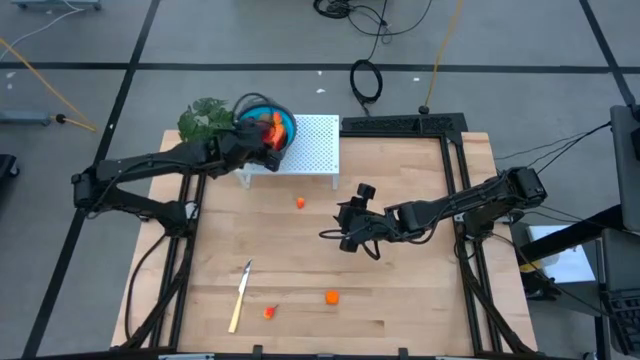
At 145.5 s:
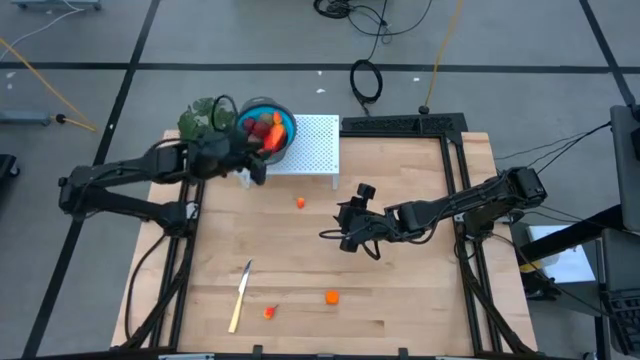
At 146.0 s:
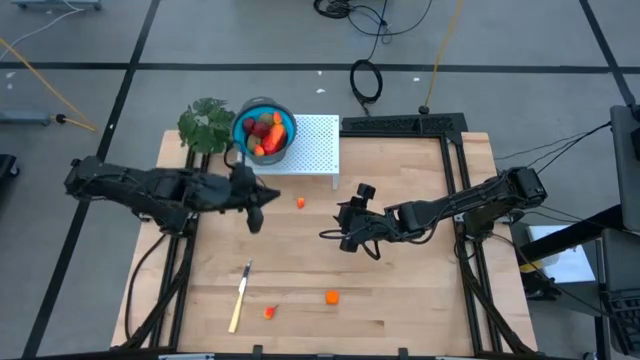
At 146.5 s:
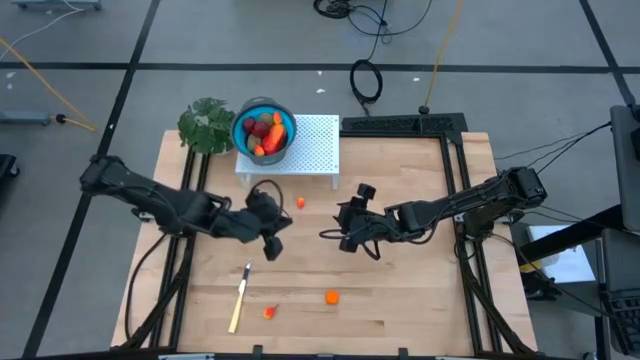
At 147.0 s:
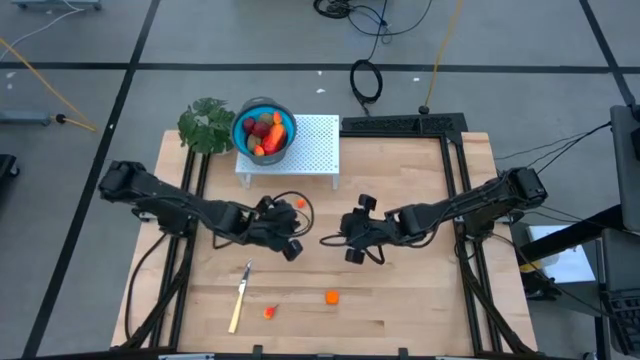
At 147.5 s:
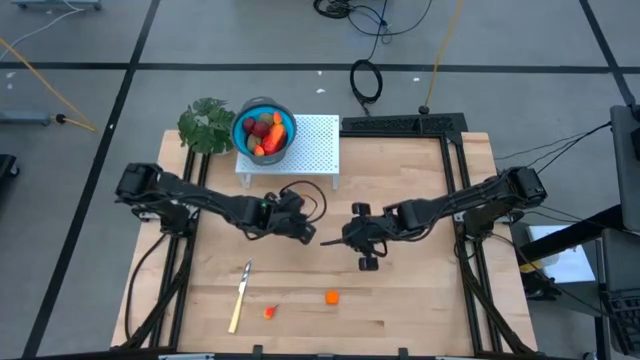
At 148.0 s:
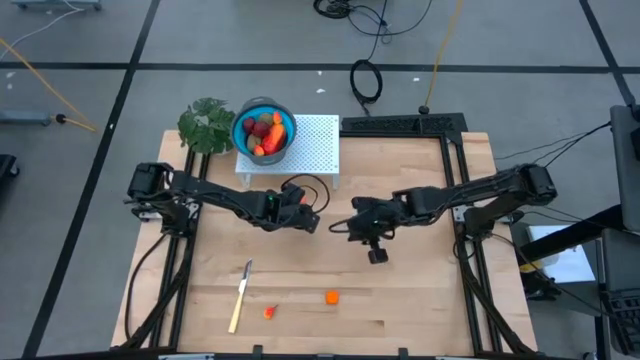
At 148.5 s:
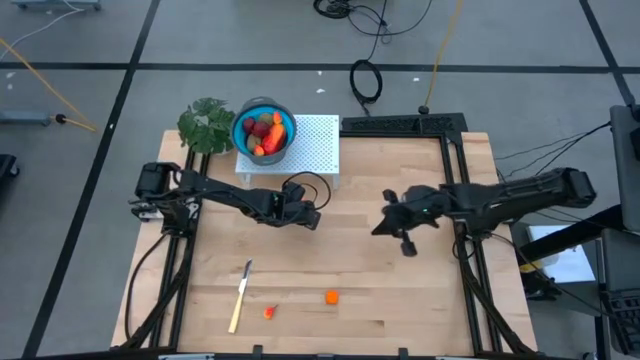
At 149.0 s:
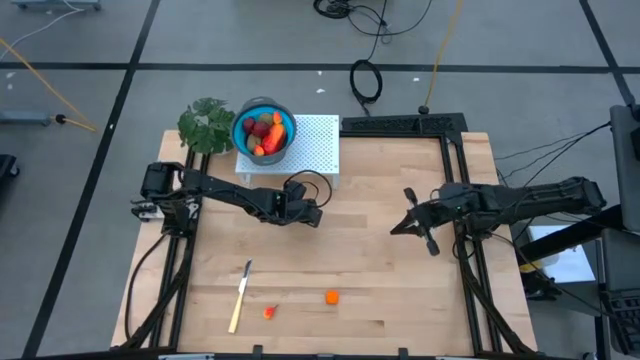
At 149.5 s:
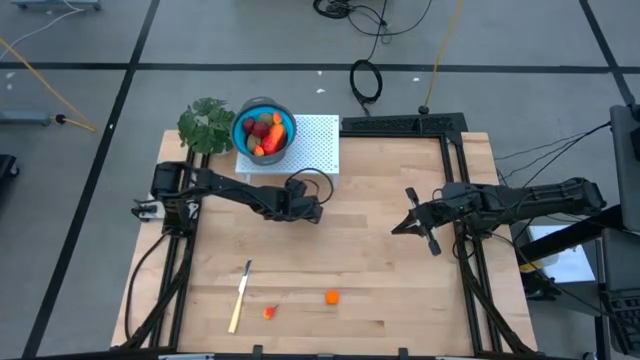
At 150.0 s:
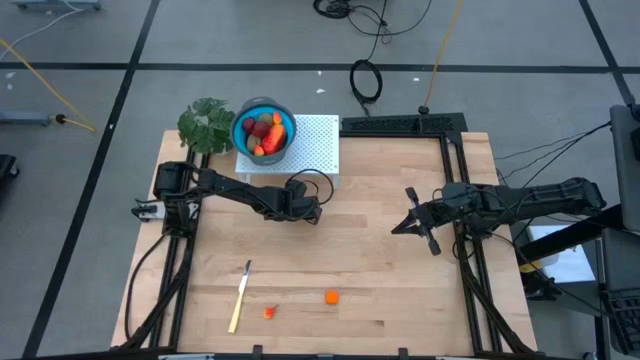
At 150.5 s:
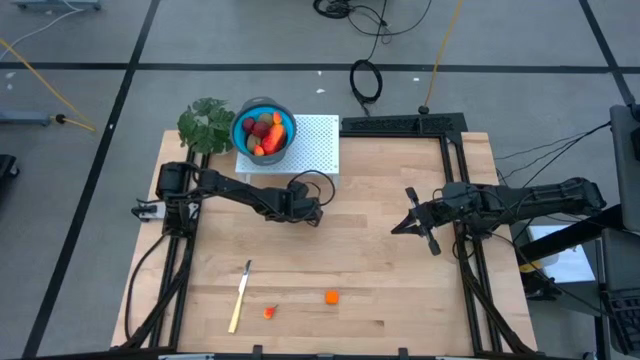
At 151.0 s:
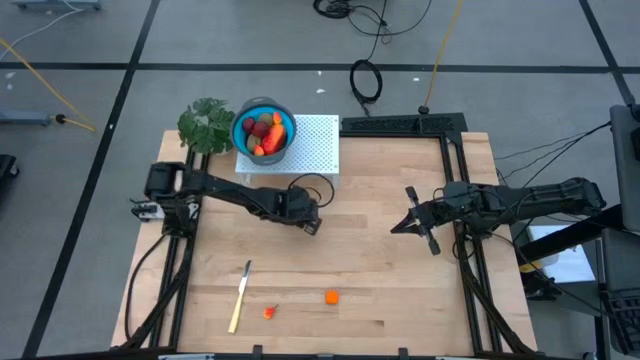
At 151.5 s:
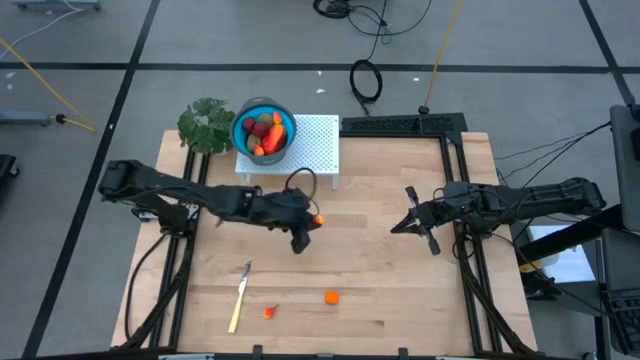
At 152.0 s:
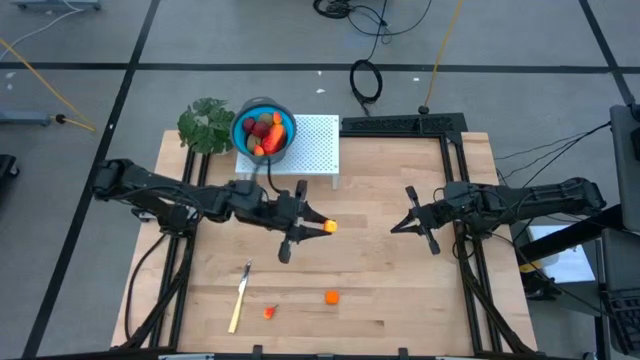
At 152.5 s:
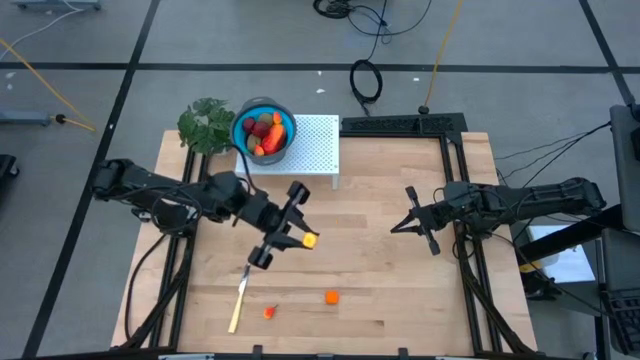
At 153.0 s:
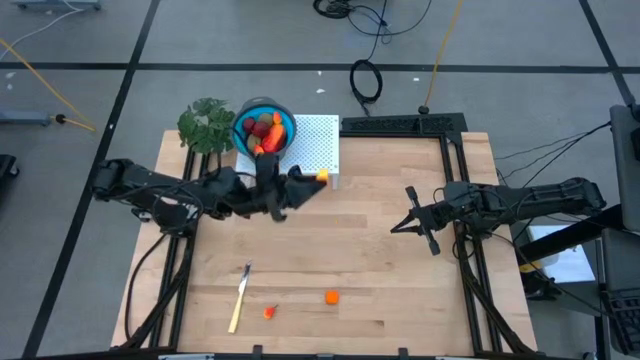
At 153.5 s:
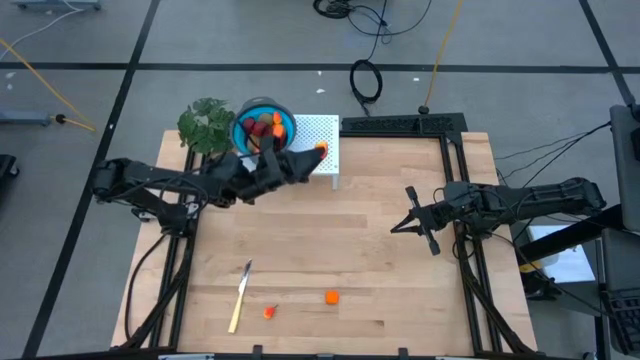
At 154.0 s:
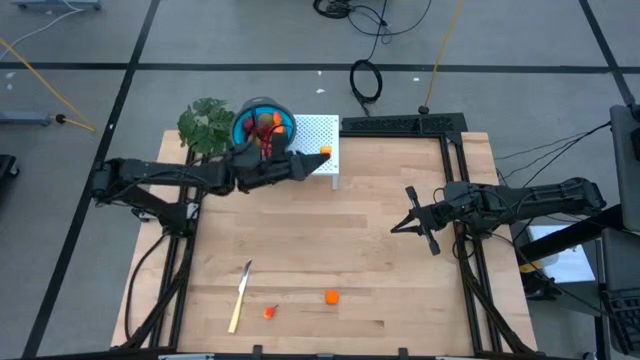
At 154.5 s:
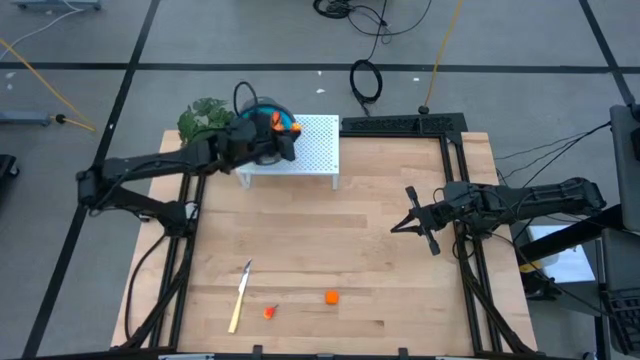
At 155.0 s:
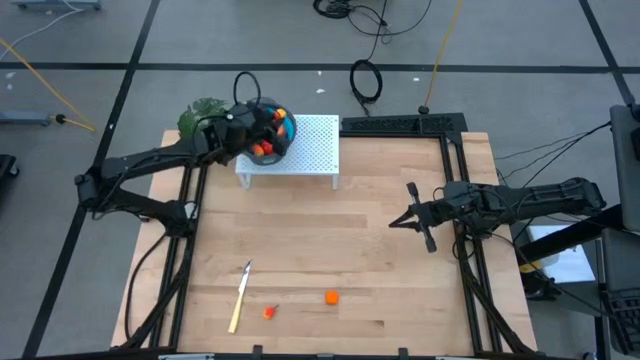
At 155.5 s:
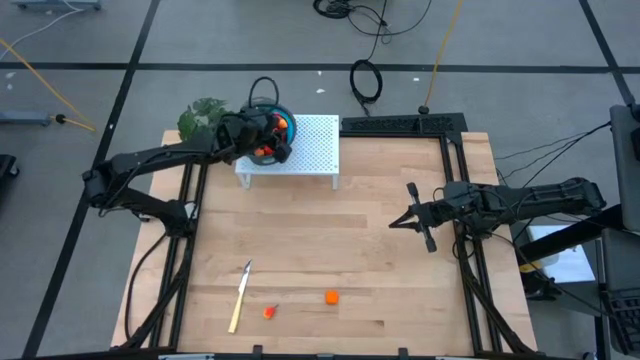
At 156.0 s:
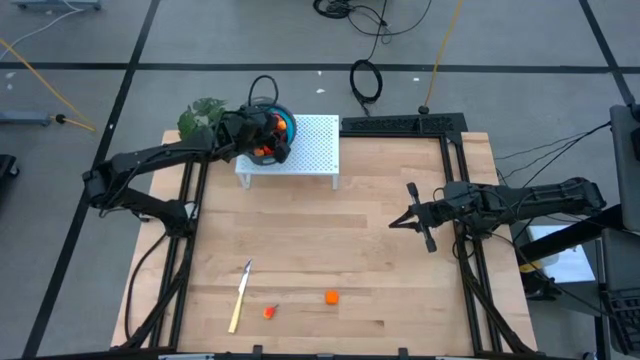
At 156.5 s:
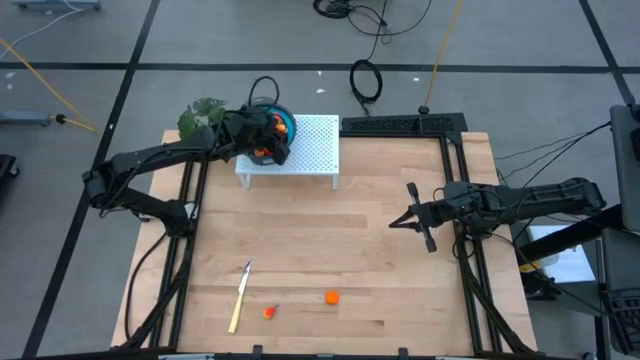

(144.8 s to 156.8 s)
Task: Pick & Place Fruit
Put the top peach into the blue strainer bowl on the shelf

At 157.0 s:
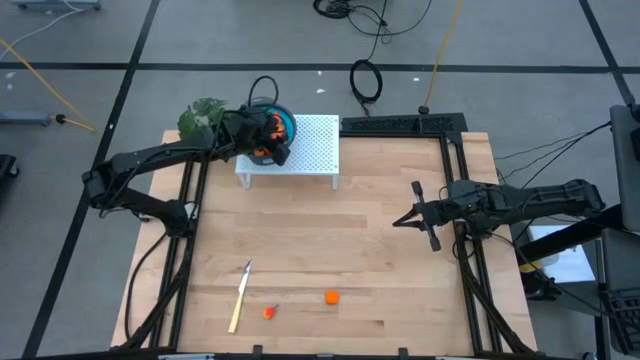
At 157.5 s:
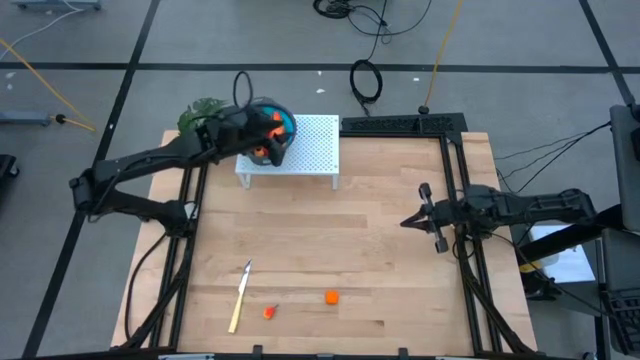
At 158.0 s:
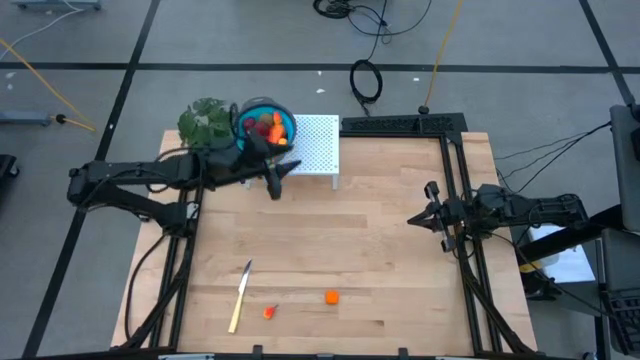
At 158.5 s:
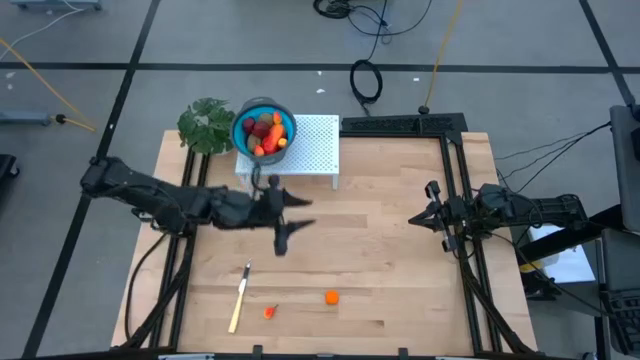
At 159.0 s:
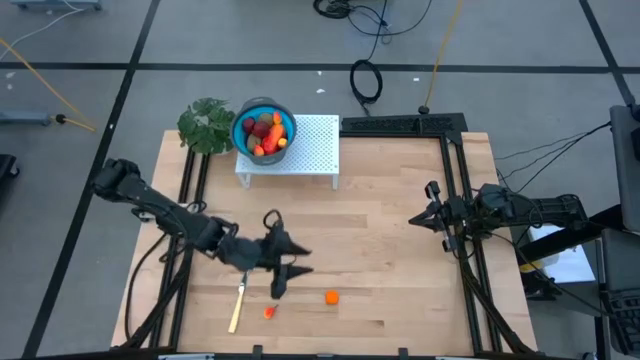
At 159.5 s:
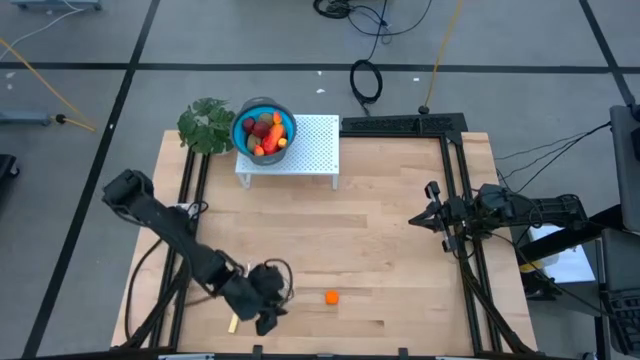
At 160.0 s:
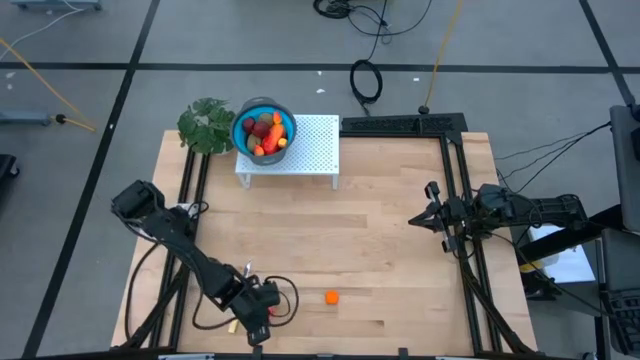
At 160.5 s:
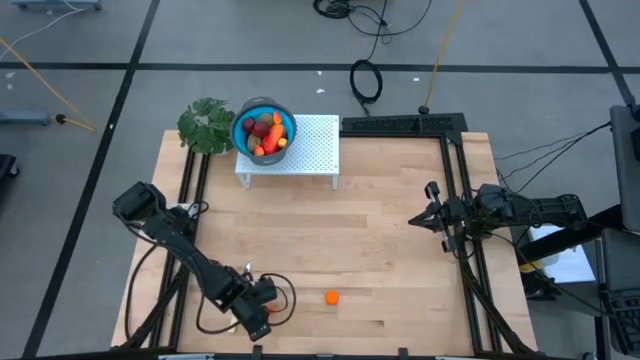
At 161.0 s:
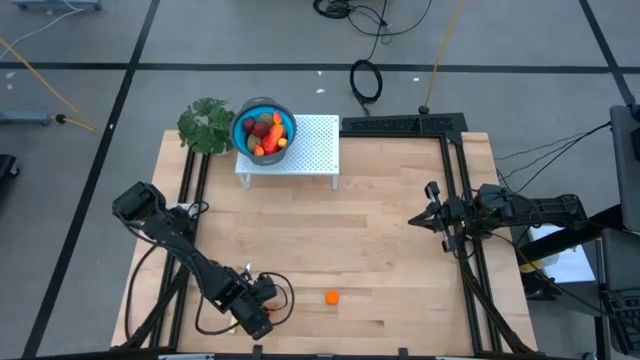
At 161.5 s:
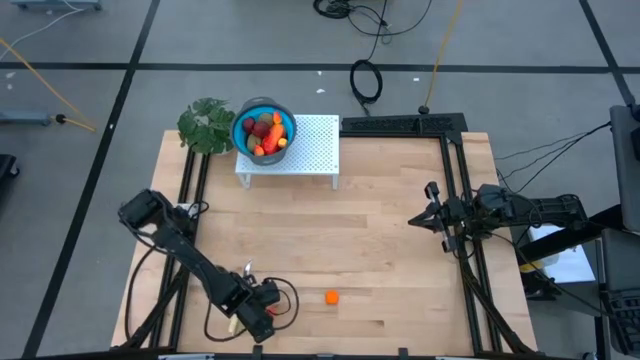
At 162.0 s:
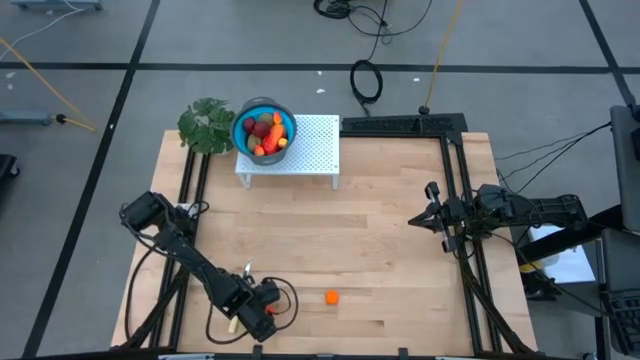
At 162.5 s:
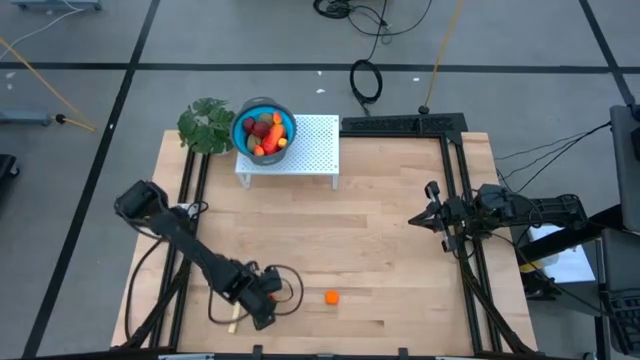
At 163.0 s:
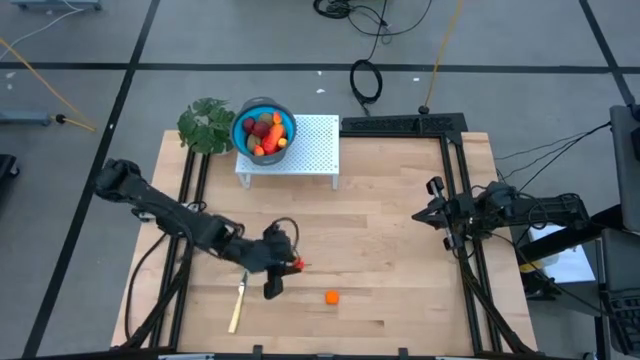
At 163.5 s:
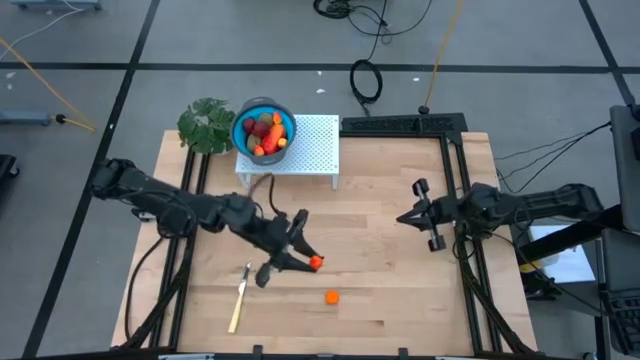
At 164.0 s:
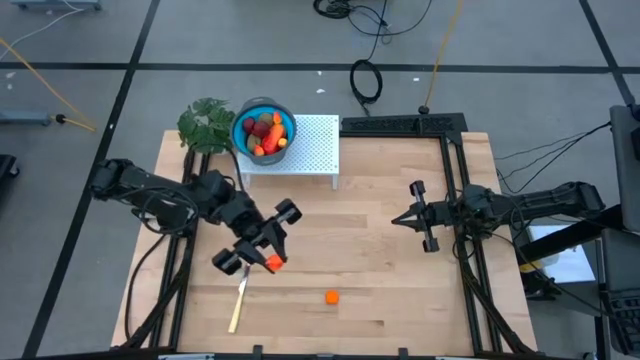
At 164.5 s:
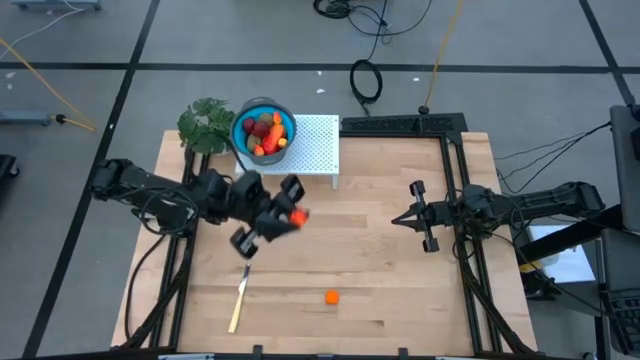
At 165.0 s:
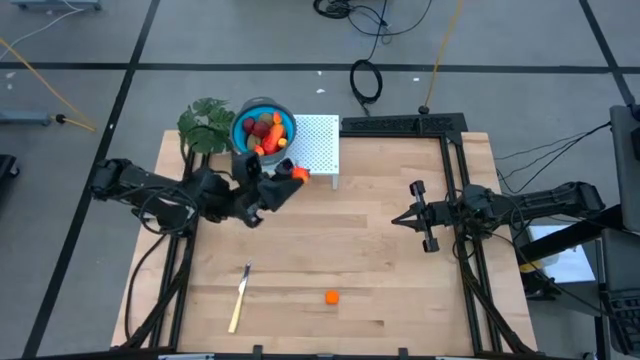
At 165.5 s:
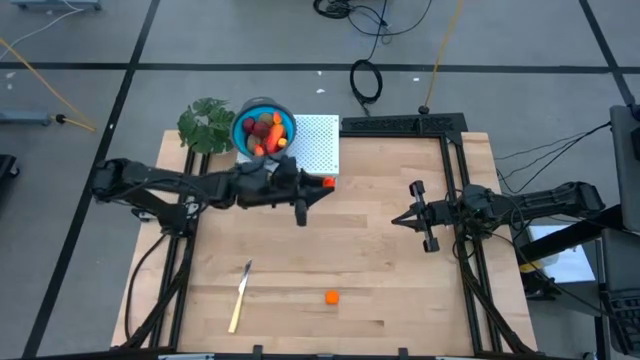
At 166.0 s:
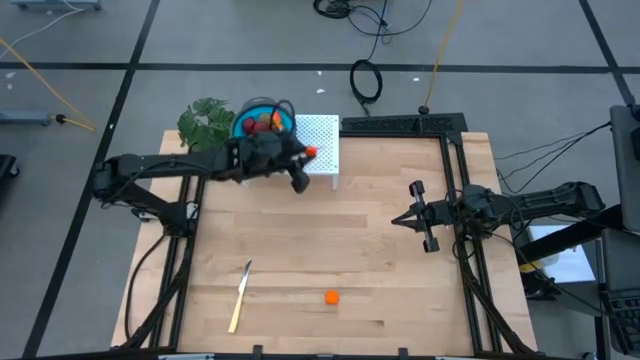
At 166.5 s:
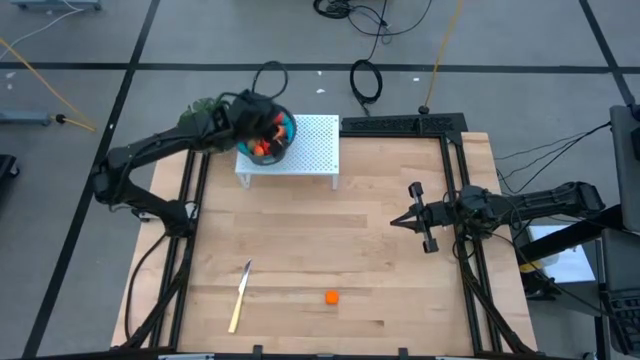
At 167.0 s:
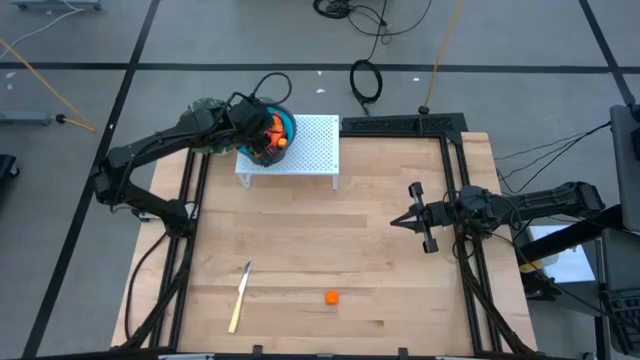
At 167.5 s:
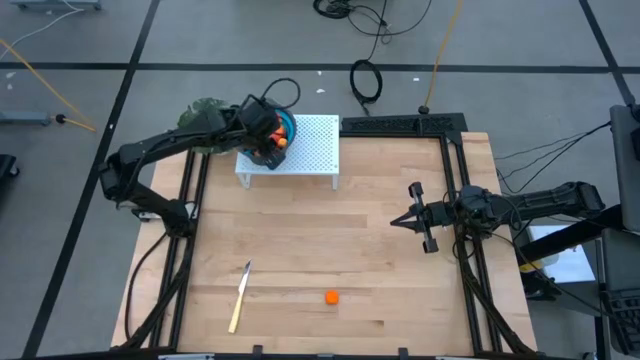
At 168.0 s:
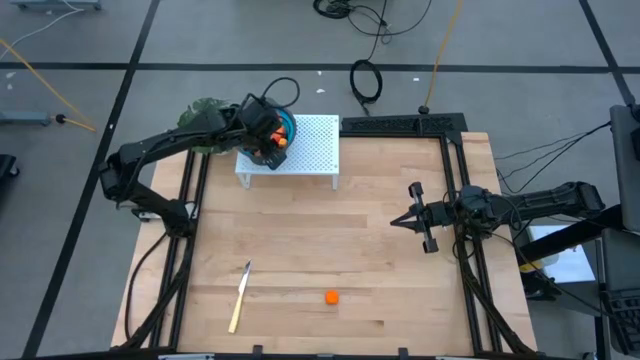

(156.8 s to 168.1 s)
Put the peach into the blue strainer bowl on the shelf
